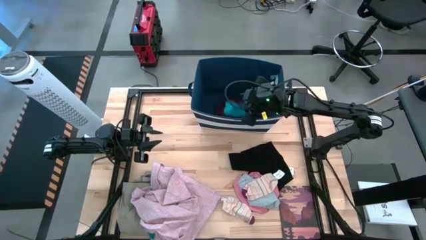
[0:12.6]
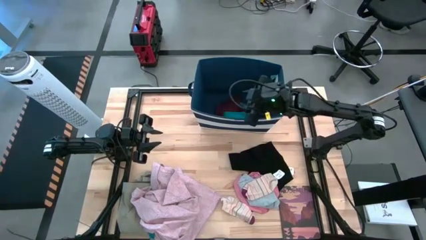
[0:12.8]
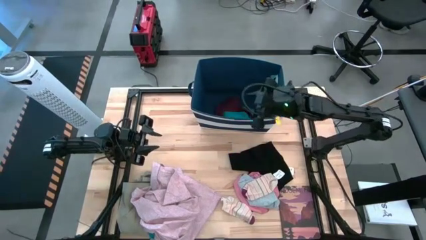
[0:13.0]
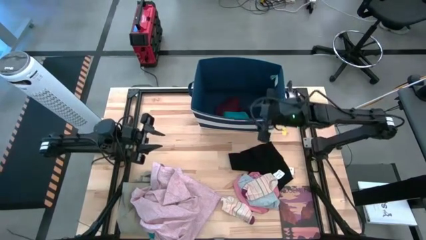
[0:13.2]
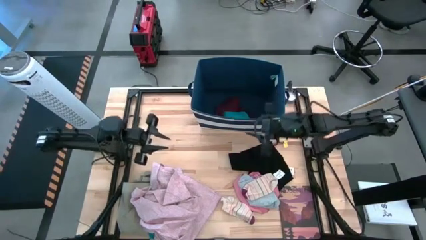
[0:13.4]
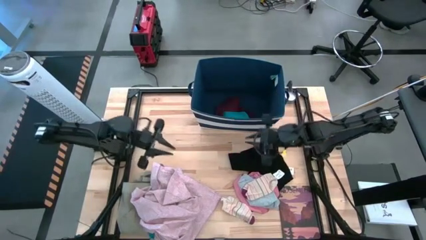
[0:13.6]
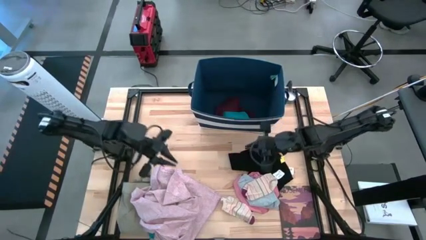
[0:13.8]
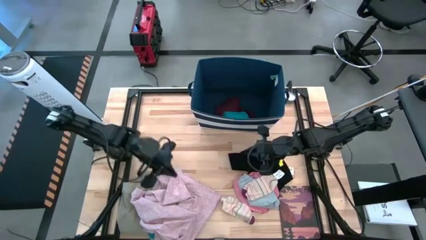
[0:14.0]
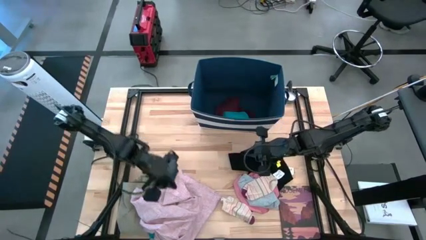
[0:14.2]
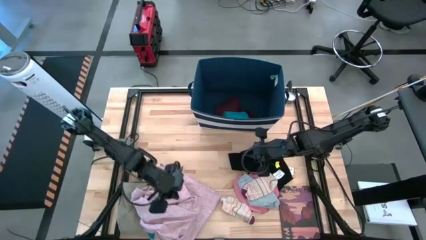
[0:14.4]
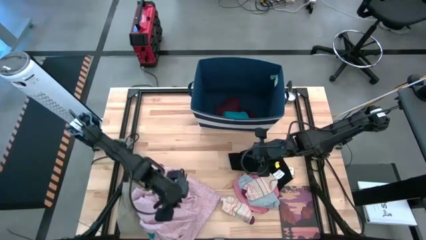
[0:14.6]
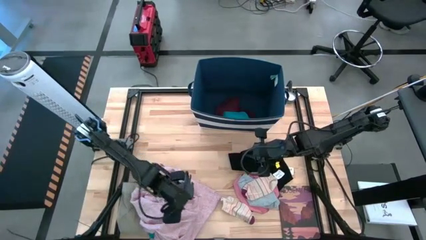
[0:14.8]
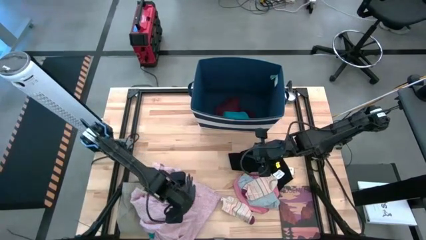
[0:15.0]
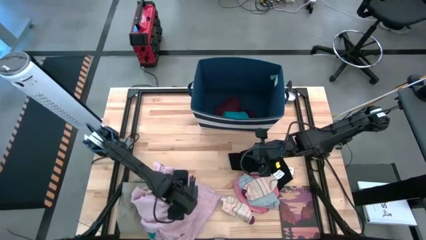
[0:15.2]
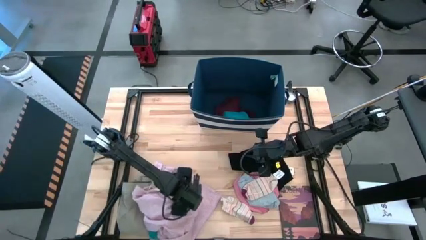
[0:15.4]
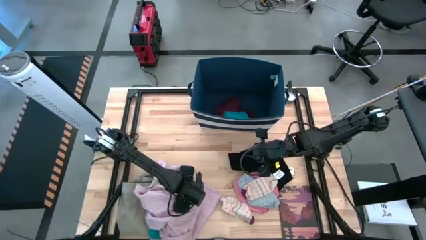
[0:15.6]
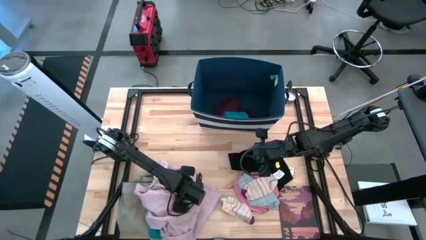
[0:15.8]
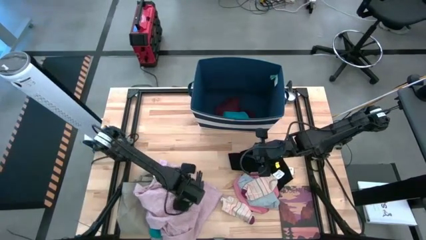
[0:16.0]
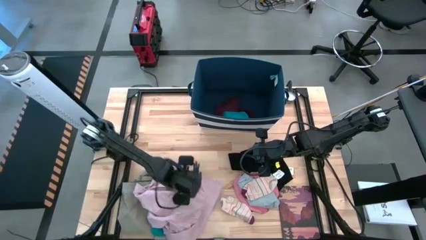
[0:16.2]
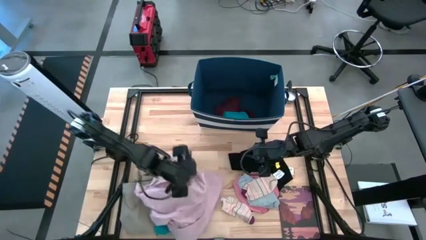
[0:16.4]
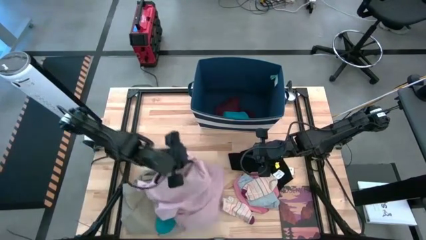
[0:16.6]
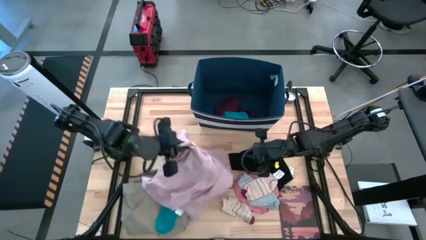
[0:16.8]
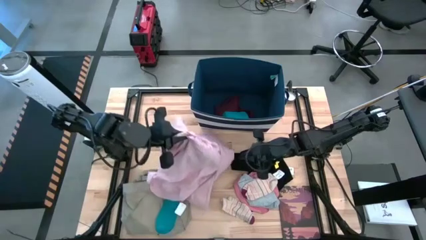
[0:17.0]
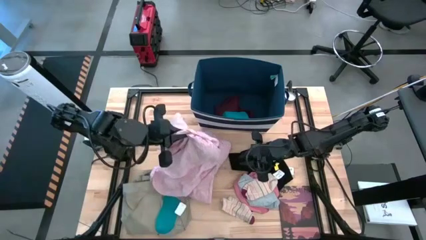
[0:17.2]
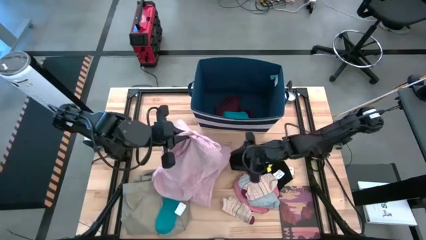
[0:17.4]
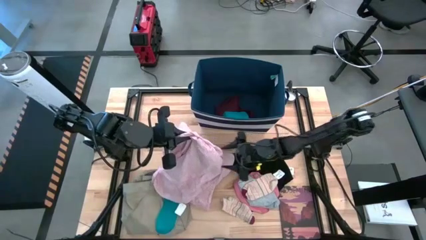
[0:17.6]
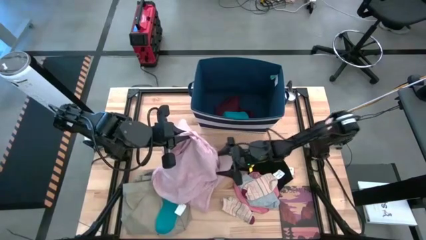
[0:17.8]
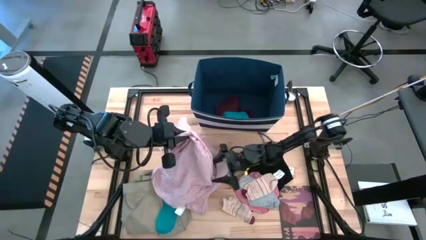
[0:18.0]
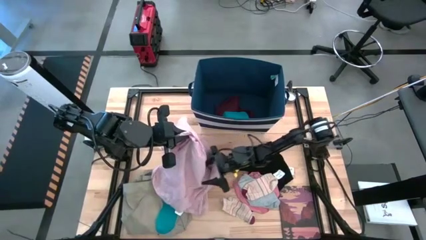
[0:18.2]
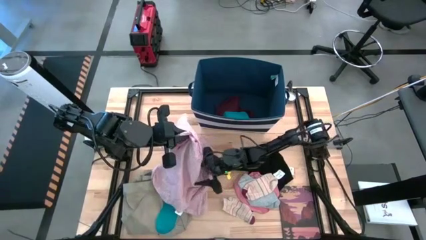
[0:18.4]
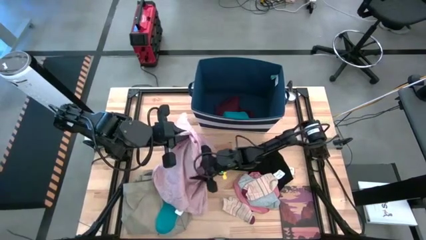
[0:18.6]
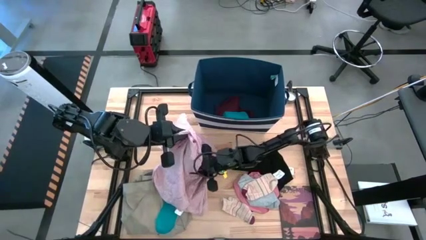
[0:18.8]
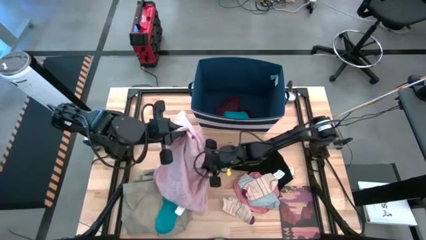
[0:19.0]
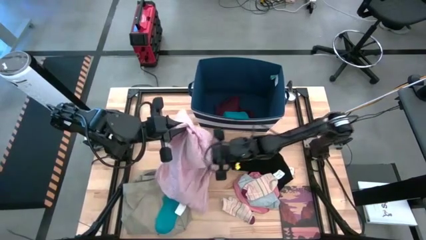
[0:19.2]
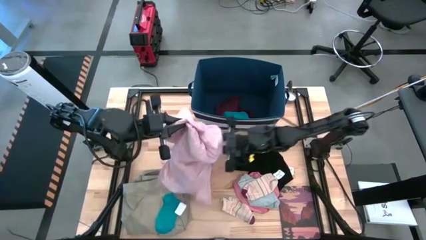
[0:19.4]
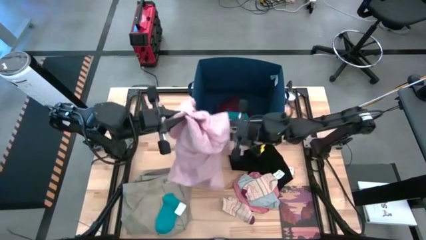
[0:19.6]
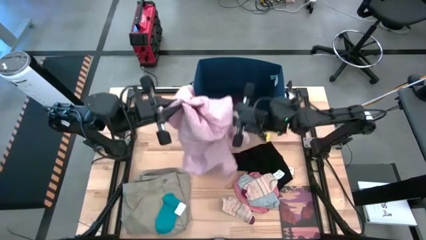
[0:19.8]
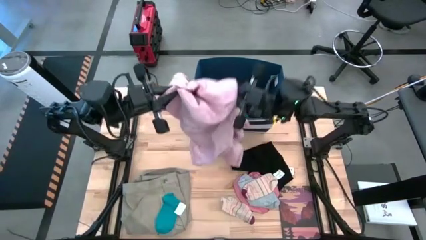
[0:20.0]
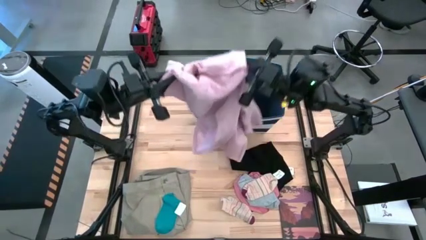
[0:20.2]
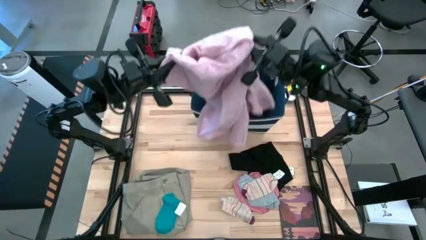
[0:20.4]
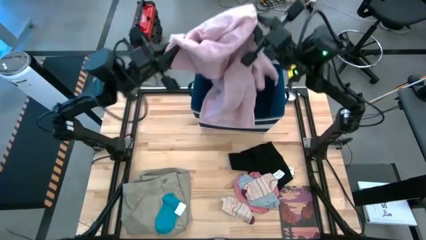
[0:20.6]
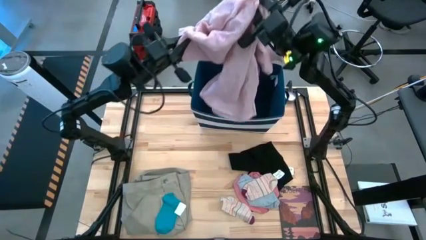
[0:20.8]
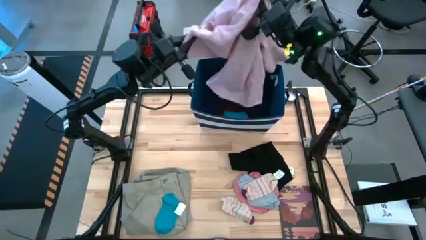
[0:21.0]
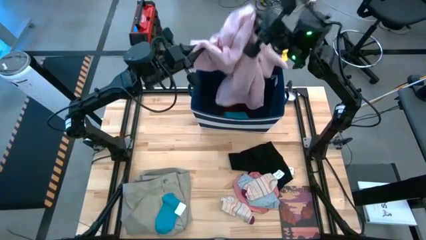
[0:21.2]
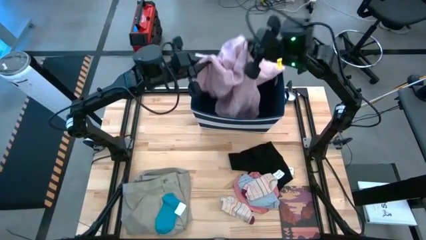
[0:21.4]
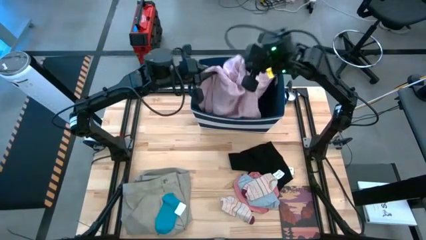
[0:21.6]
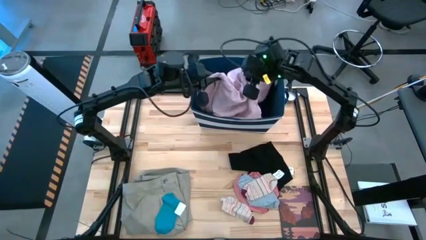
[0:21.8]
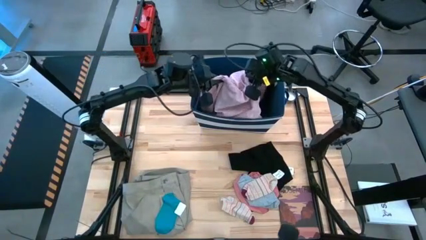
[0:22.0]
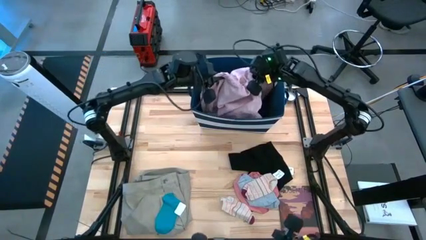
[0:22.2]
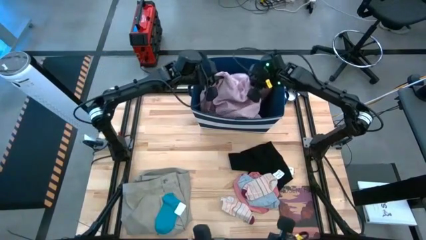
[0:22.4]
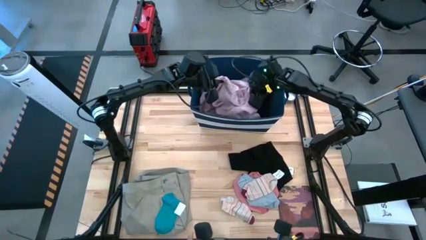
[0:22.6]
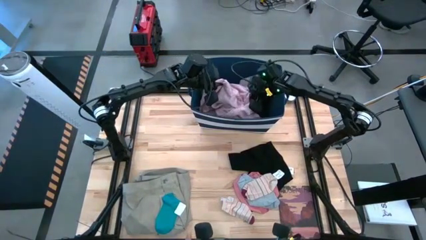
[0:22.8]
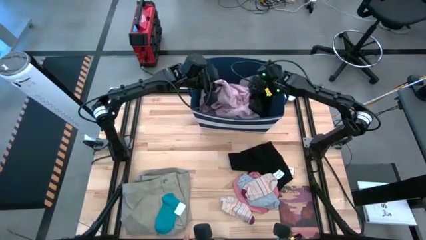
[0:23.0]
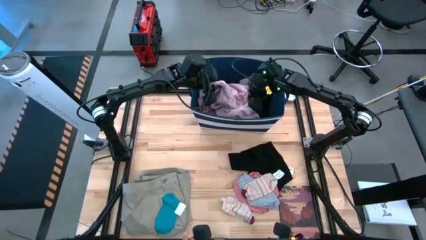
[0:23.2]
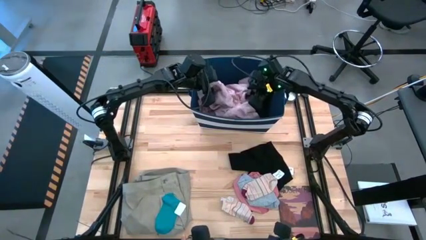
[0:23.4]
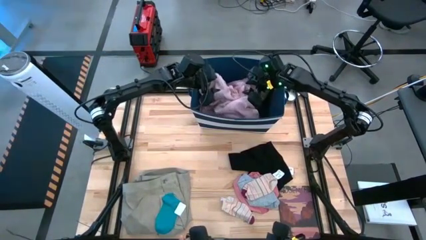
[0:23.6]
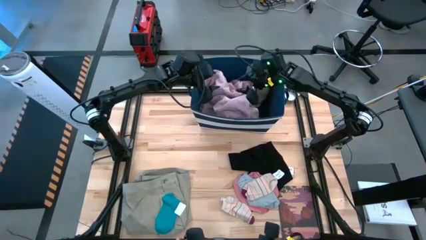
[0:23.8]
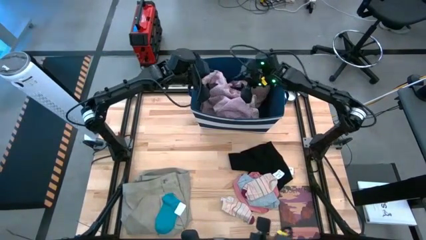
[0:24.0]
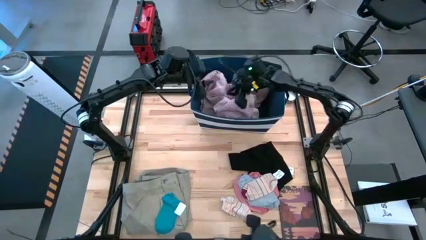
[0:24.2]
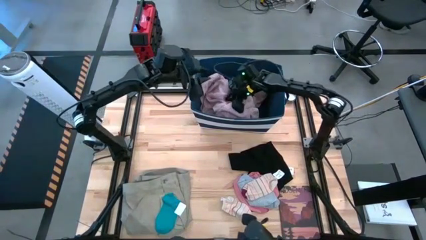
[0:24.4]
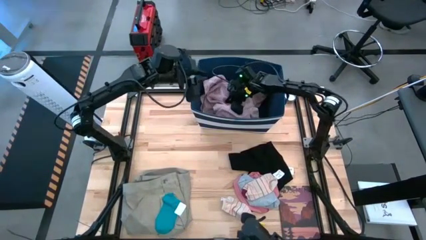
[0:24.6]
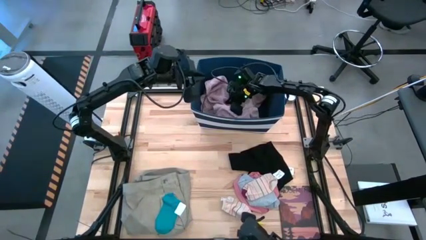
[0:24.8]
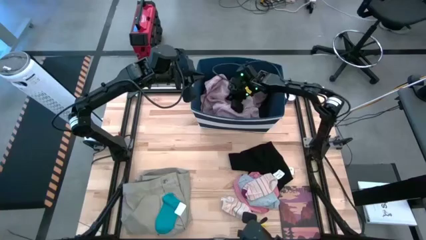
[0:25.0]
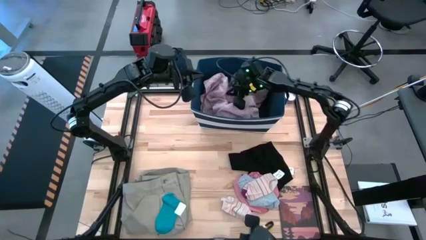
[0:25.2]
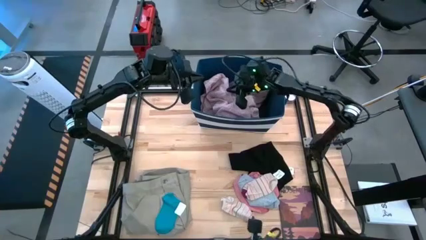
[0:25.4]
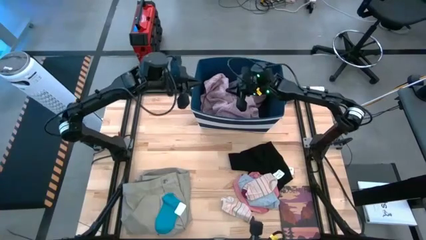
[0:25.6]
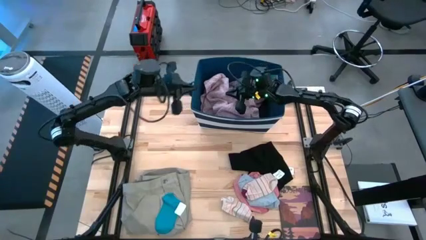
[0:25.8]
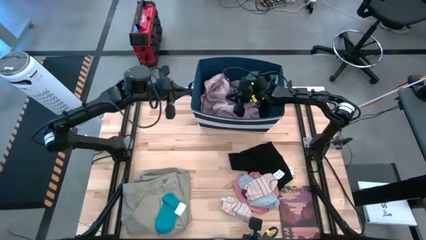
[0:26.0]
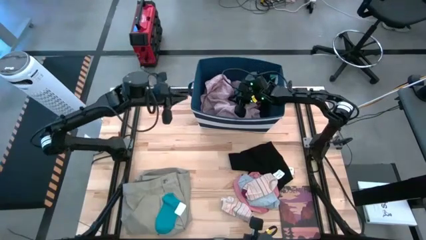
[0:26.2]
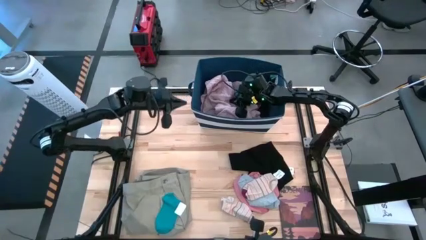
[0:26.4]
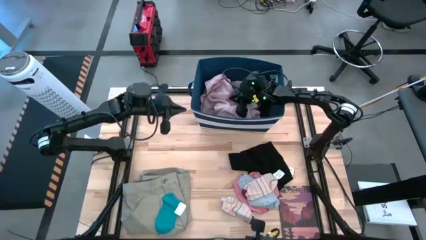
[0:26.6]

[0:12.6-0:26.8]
Task: Sort clothes
Put the pink dress into the blue laundry bin
